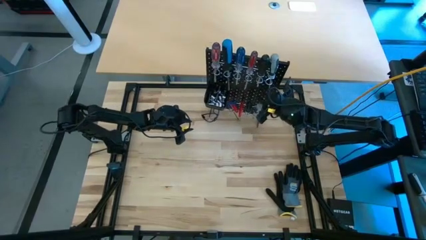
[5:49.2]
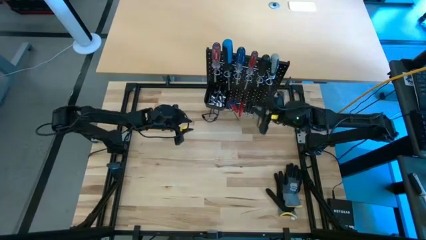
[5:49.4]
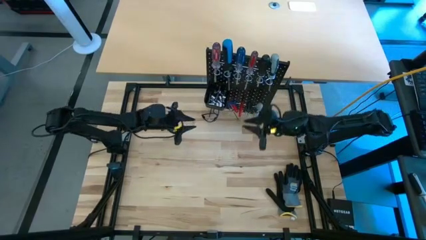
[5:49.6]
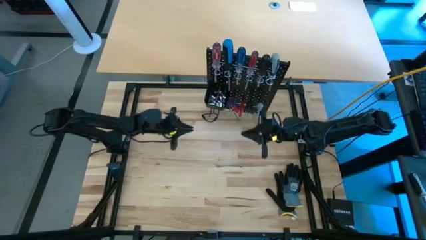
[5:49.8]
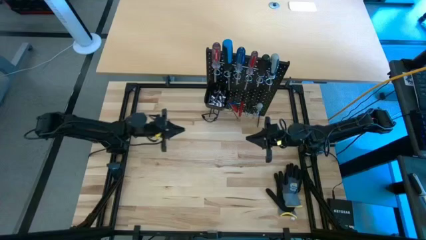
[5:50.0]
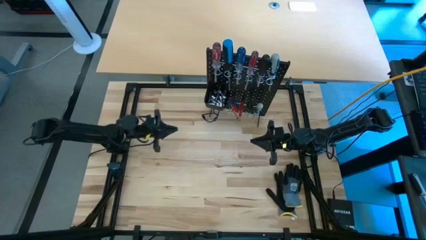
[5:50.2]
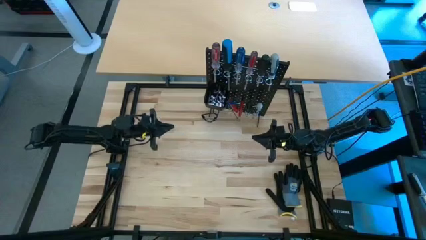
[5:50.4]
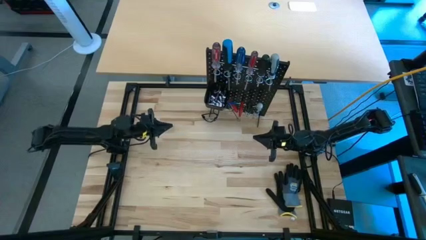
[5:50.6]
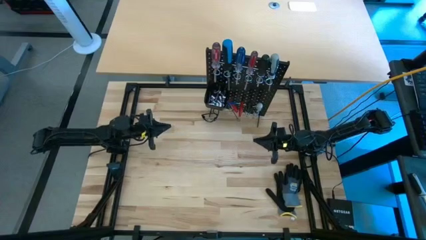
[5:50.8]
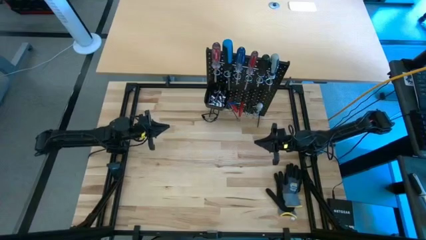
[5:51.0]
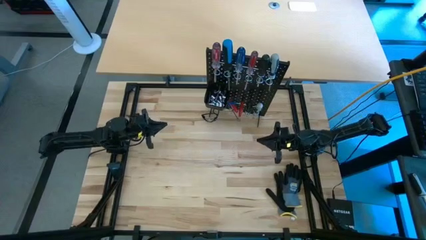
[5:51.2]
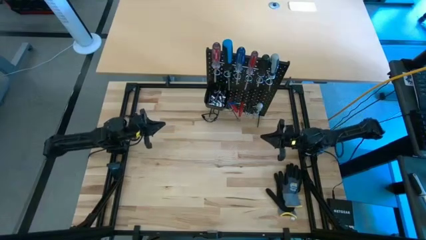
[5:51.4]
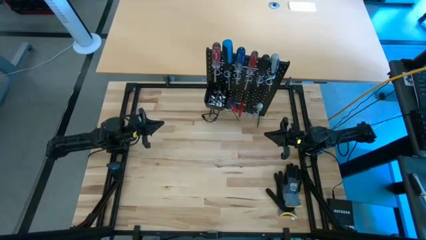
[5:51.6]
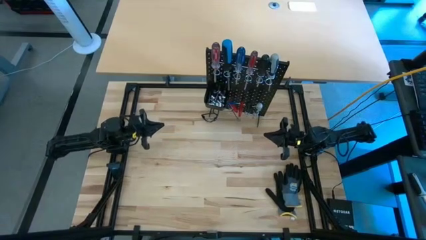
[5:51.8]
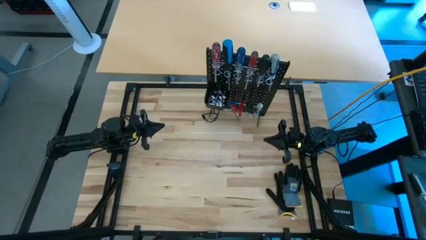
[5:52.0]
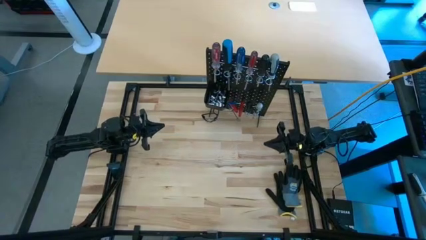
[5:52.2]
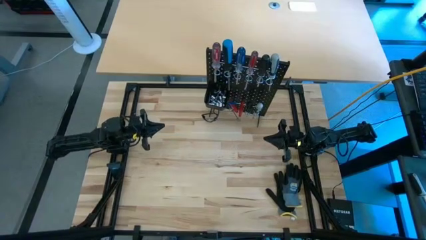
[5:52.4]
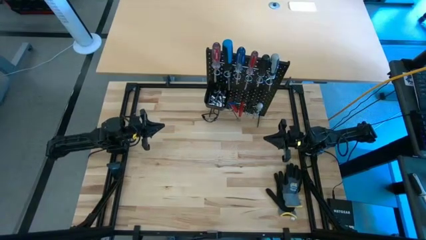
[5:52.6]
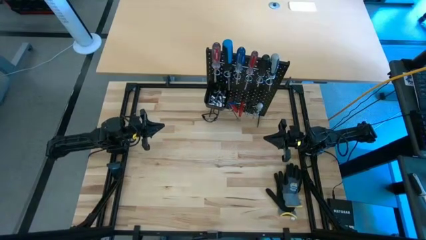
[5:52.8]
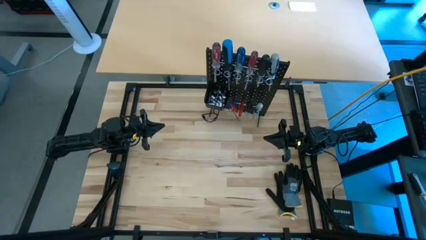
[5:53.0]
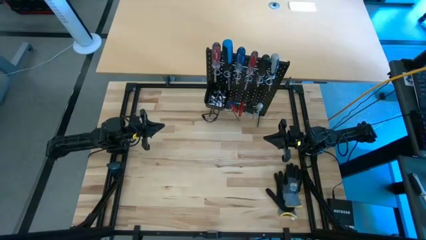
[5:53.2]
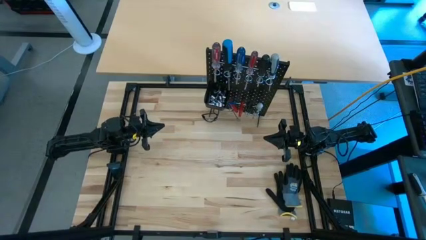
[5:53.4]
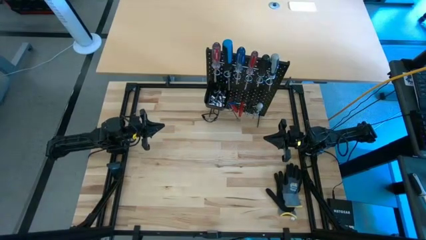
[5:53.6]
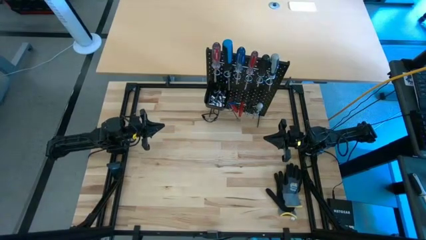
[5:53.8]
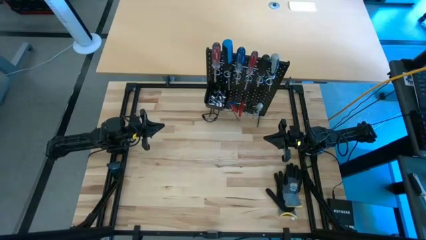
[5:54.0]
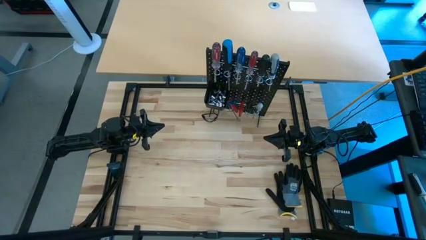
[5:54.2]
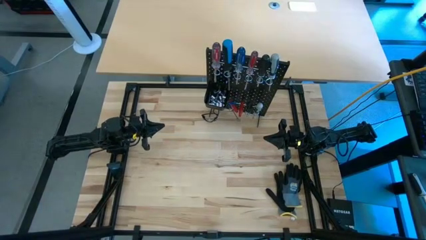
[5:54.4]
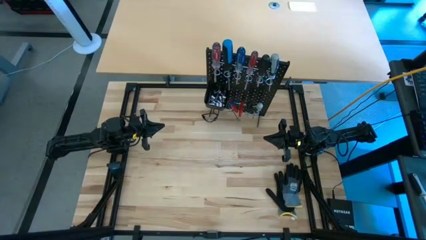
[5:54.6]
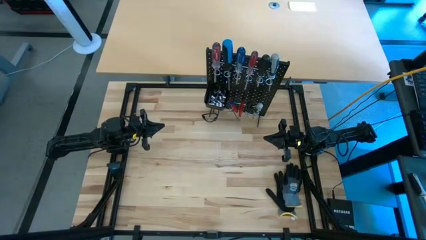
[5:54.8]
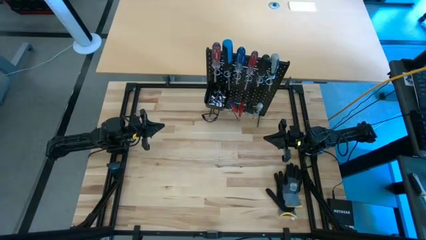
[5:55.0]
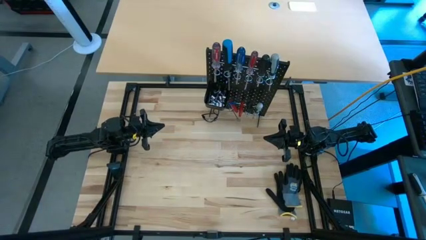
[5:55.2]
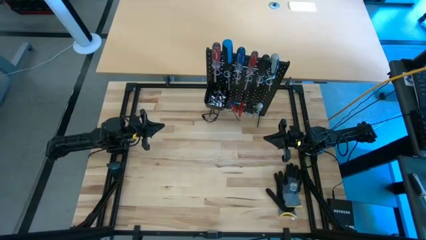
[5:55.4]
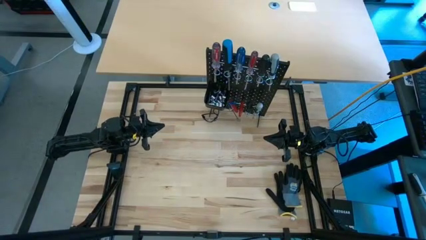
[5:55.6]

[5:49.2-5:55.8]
Task: Hang tools onto peg board
Return to Home Position

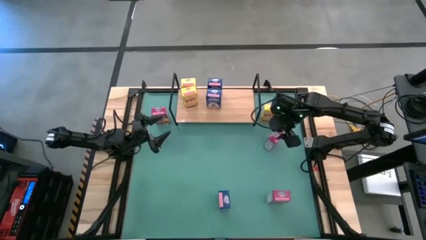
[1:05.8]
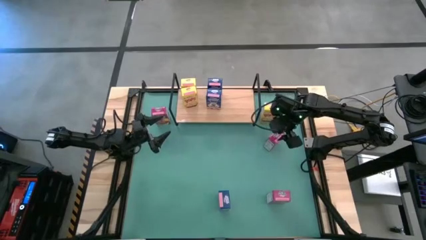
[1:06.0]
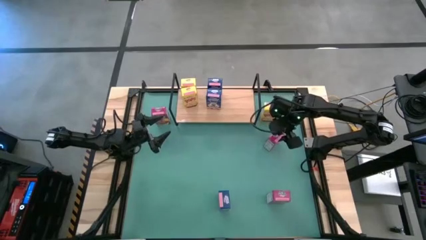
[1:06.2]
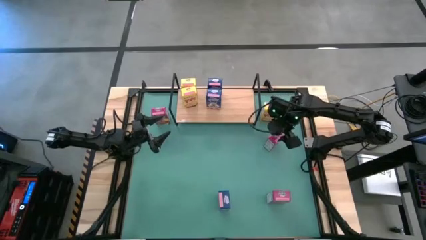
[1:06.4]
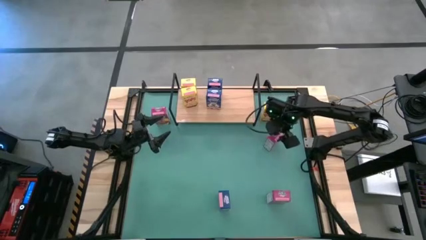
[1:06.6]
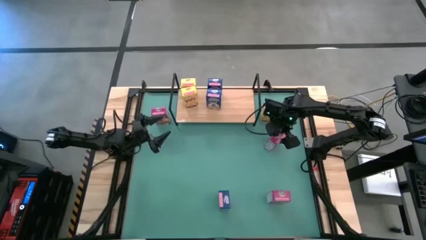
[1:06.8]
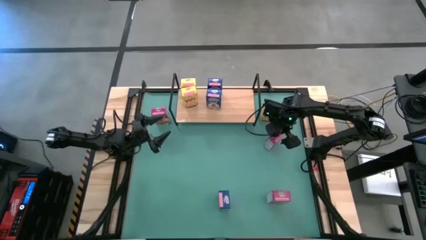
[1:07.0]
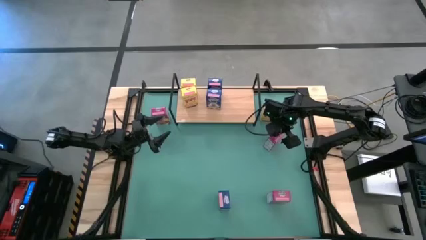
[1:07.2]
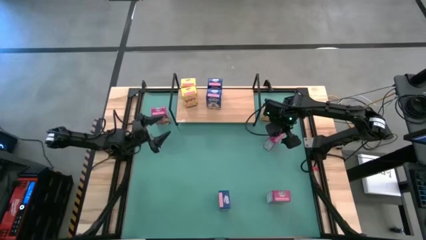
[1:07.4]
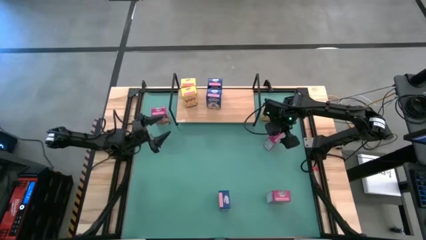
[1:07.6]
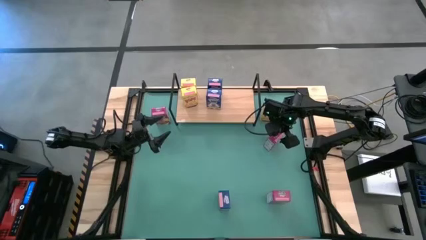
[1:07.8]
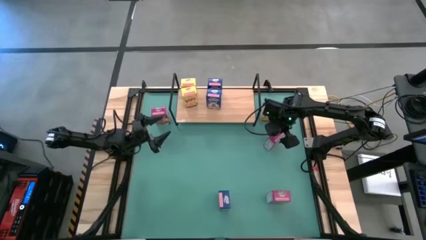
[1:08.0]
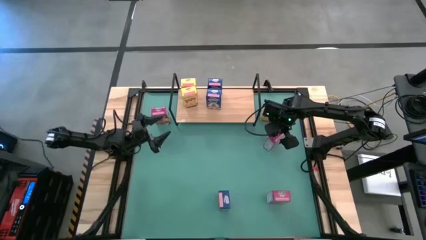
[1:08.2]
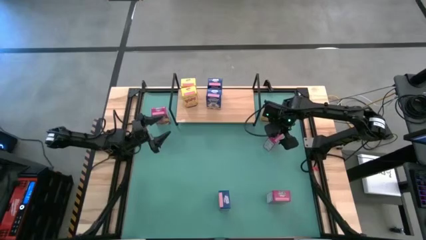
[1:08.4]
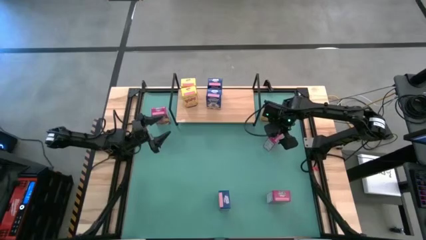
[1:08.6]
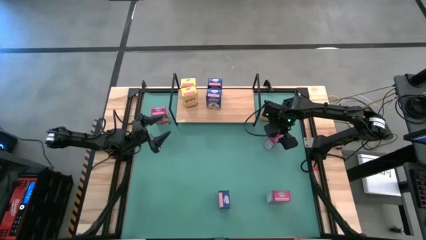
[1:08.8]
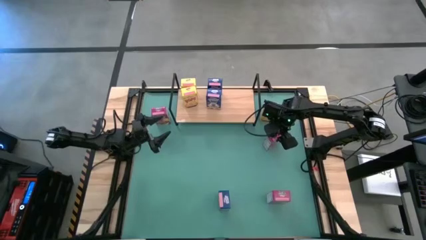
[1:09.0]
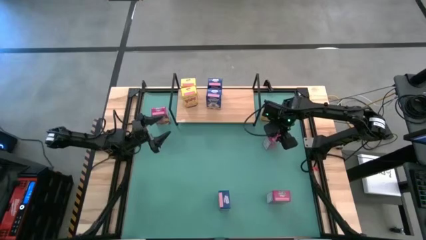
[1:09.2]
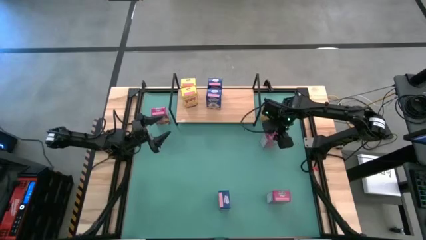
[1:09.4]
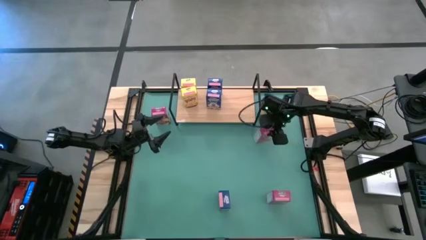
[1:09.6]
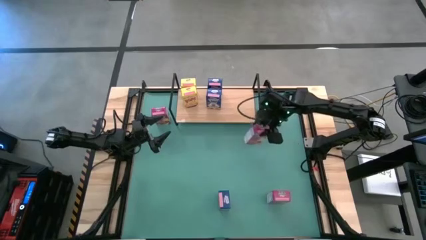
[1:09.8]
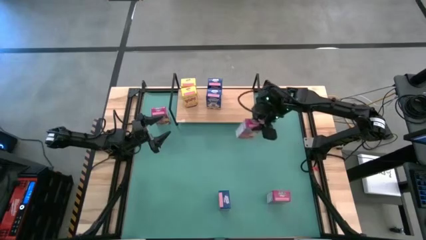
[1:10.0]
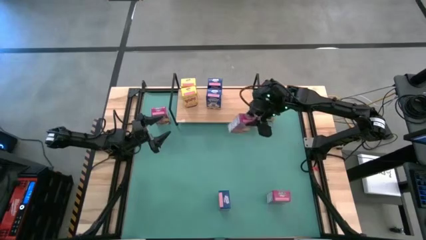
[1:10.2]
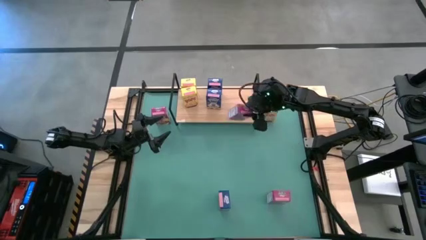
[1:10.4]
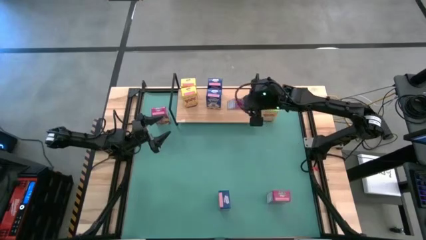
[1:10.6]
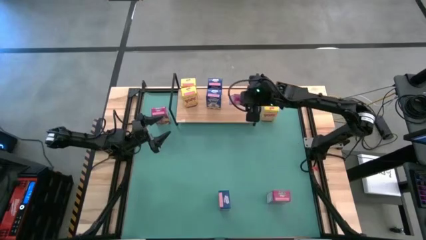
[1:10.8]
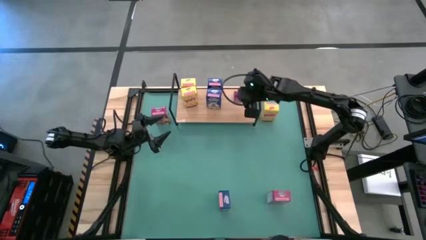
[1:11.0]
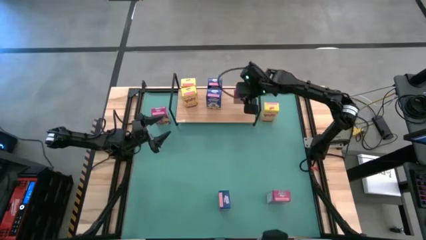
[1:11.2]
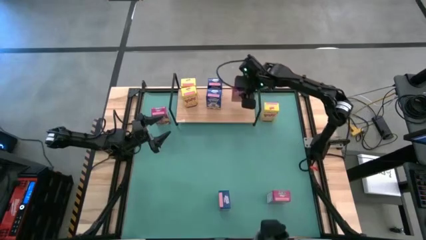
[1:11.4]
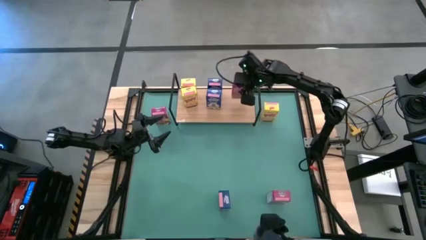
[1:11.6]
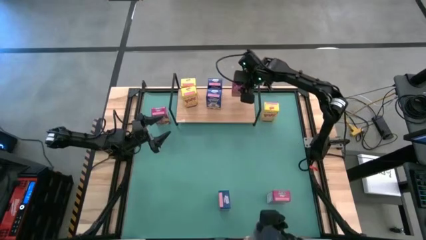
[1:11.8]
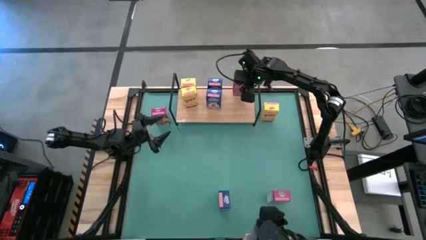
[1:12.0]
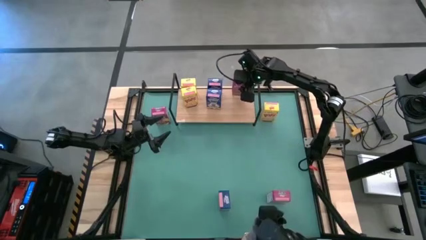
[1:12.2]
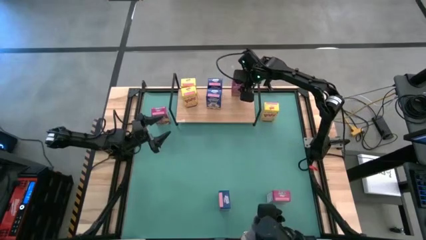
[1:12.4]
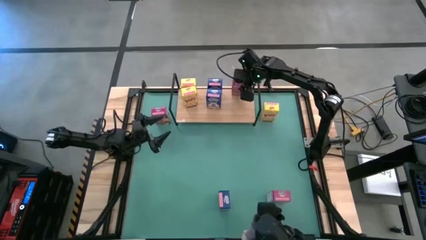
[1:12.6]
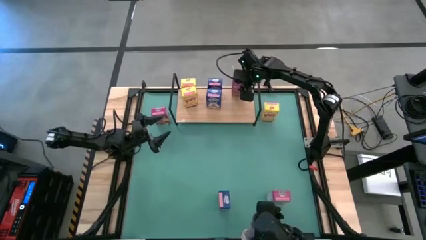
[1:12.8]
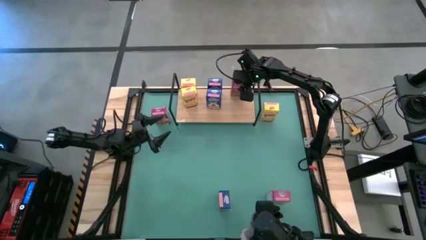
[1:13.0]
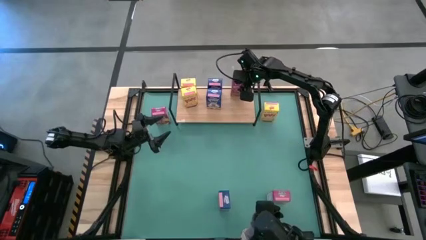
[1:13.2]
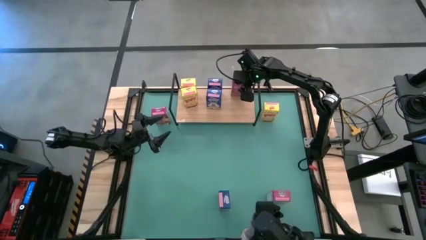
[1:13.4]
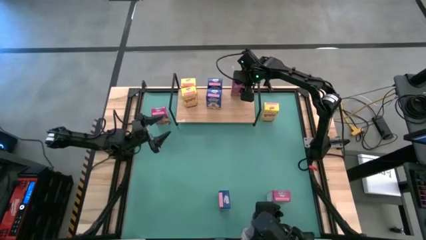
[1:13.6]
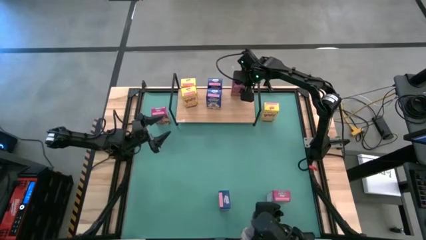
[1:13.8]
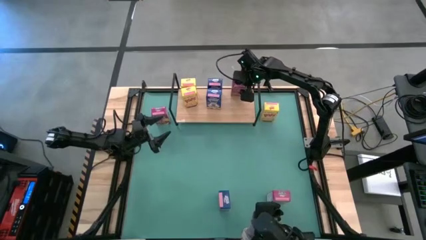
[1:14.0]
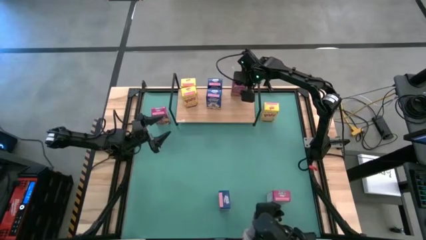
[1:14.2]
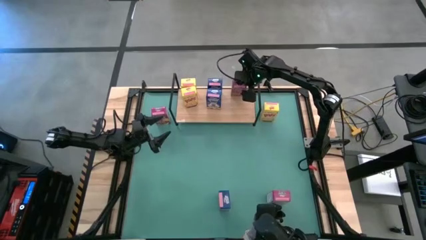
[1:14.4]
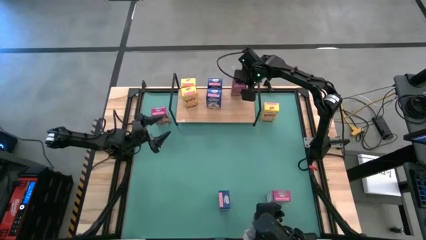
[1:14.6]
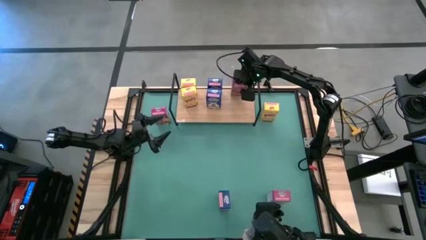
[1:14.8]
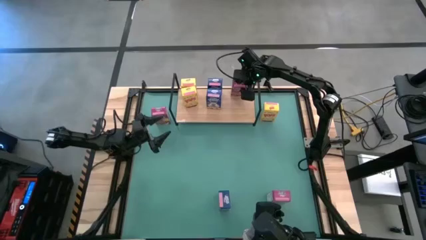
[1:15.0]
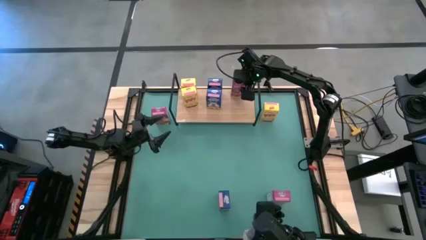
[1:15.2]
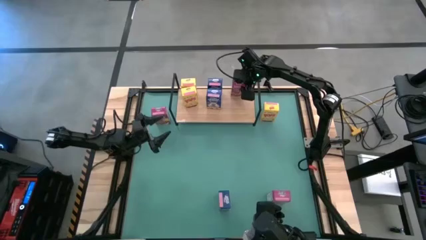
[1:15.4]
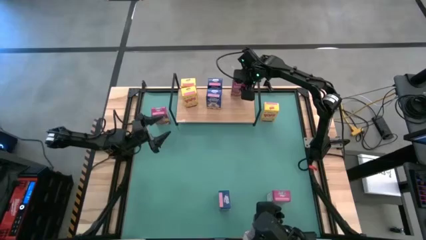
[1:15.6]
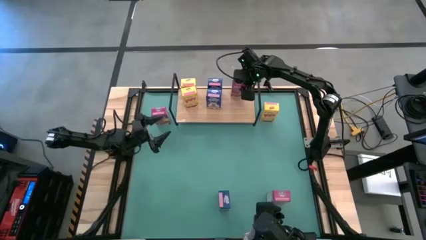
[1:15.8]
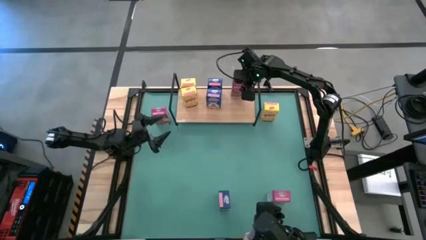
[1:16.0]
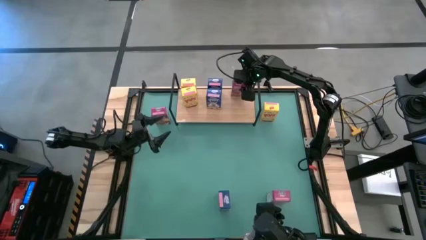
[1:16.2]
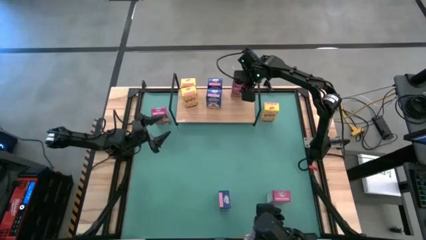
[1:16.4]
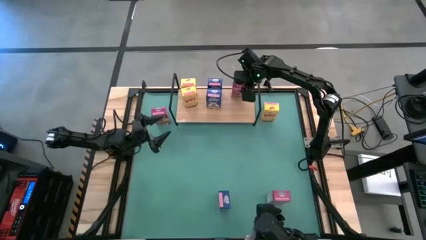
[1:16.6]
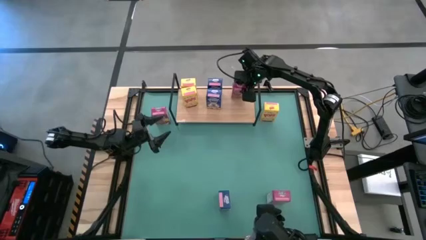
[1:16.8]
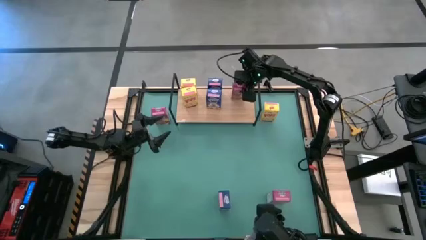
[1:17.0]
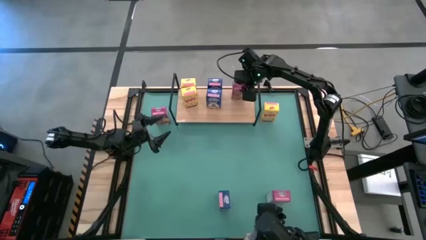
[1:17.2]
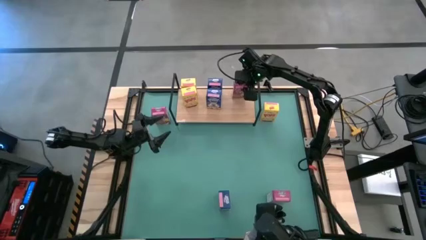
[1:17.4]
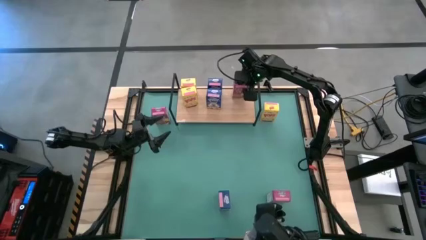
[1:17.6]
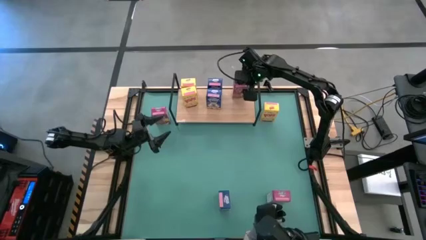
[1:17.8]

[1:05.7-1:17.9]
Task: Stack cereal on shelf
Put the middle pink cereal box on the shelf
